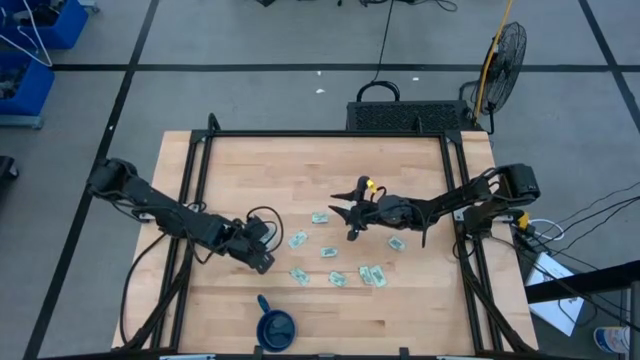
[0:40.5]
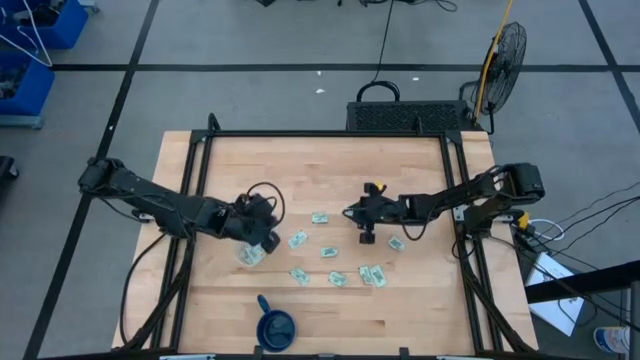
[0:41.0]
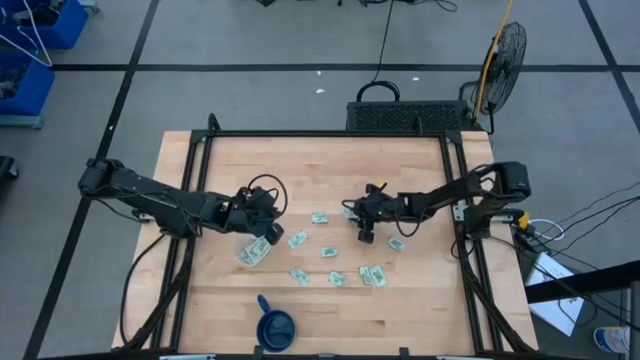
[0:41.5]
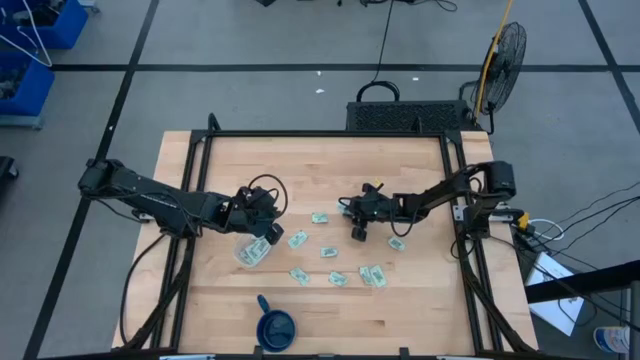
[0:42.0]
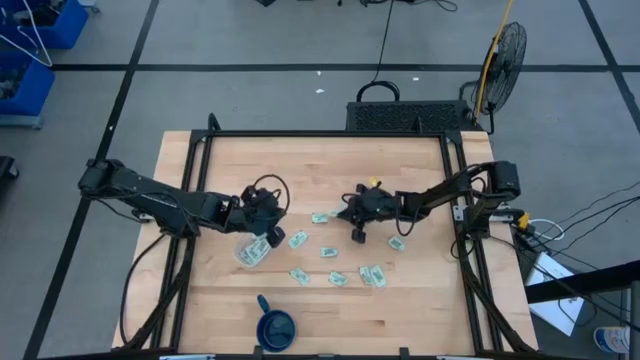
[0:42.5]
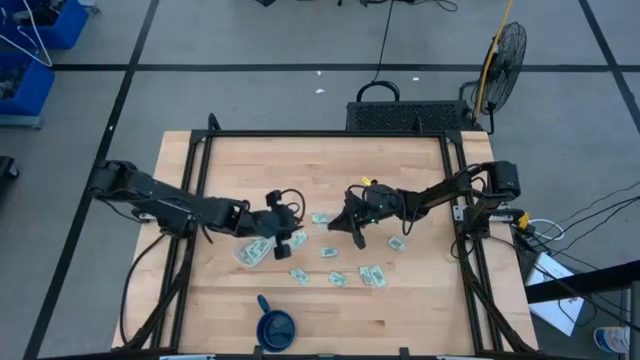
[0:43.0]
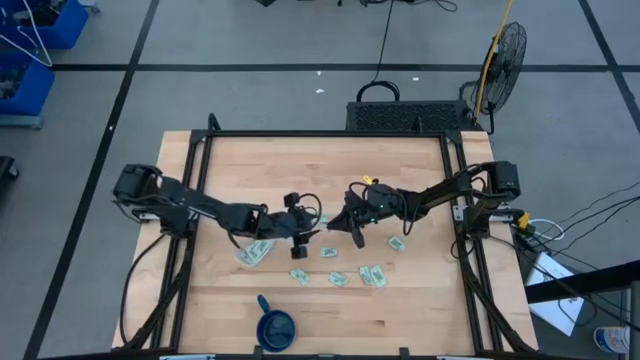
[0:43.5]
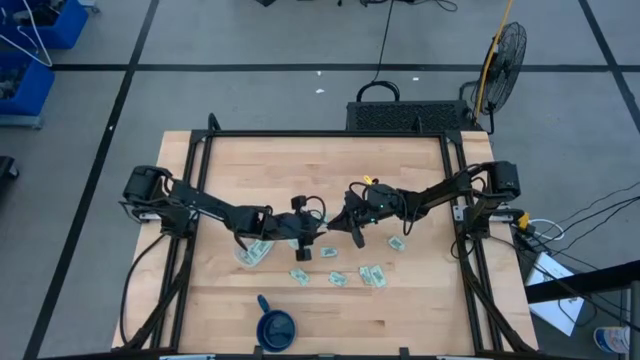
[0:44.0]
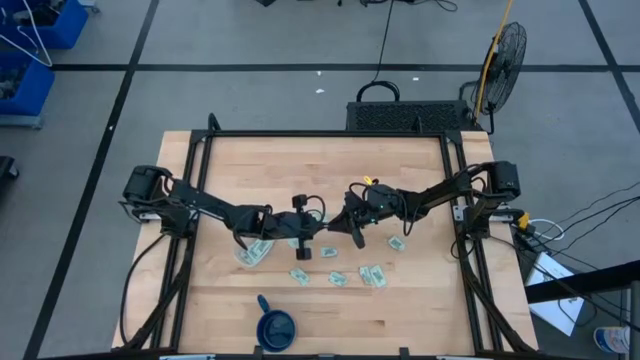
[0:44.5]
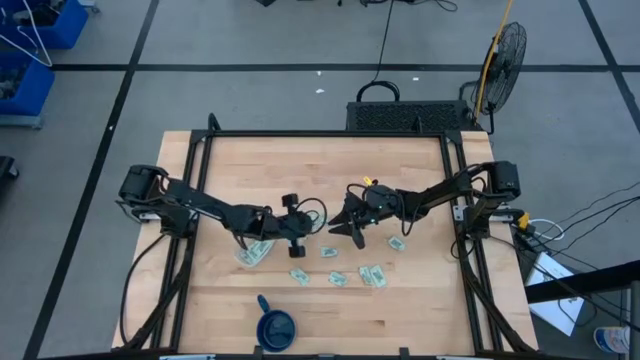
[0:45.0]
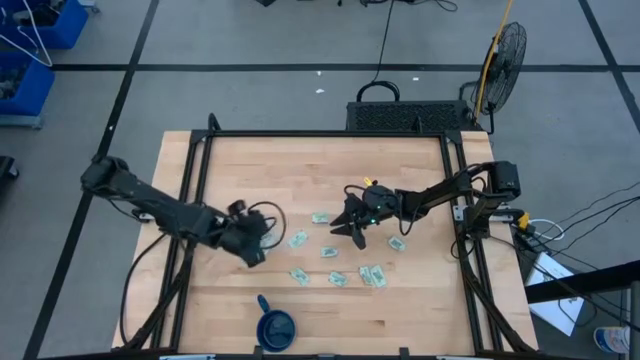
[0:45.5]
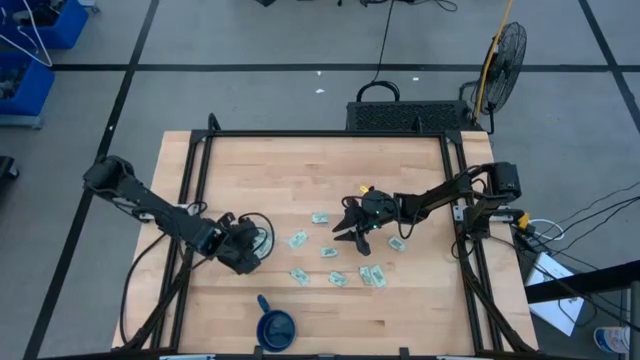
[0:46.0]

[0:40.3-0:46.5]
Task: Pick and place Stevia / Truvia into bins
Put the stevia packet into the transparent container

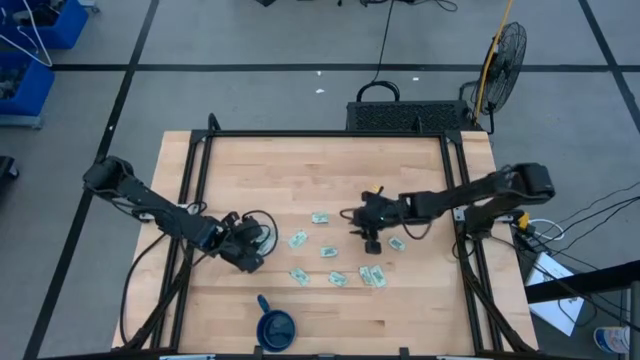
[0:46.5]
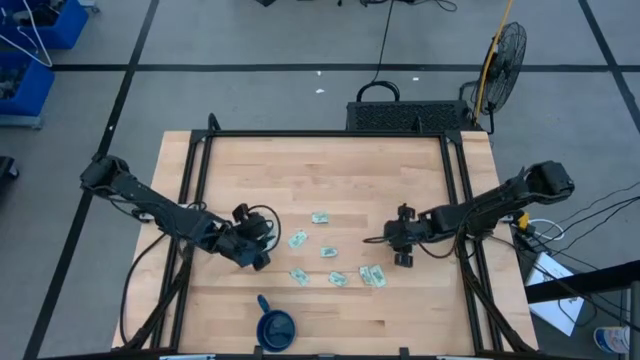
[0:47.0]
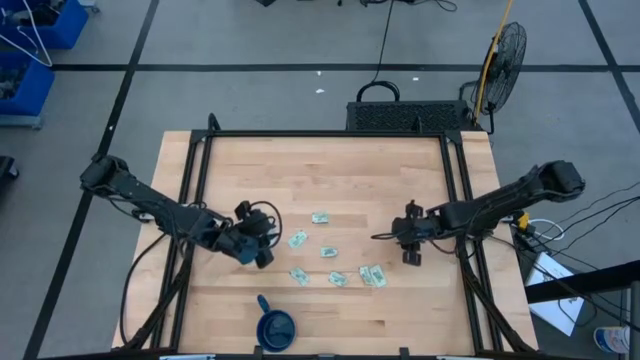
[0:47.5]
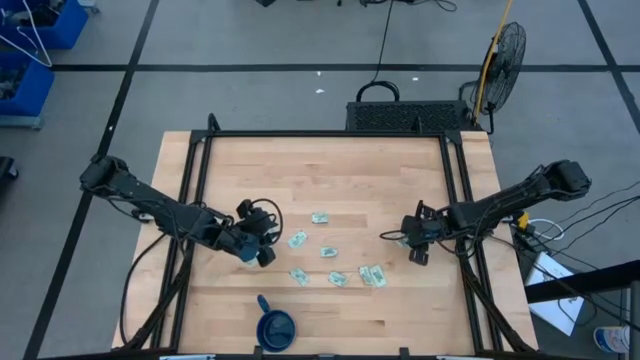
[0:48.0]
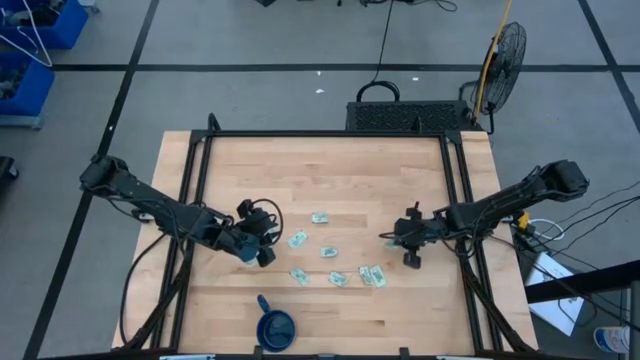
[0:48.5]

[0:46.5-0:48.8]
Put the stevia packet into the transparent container

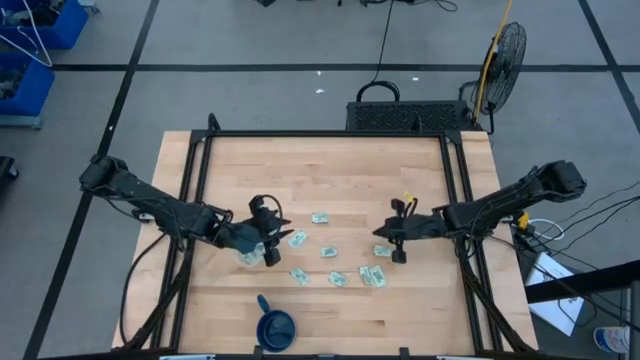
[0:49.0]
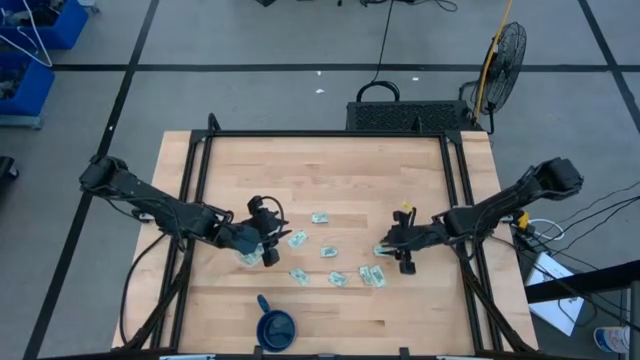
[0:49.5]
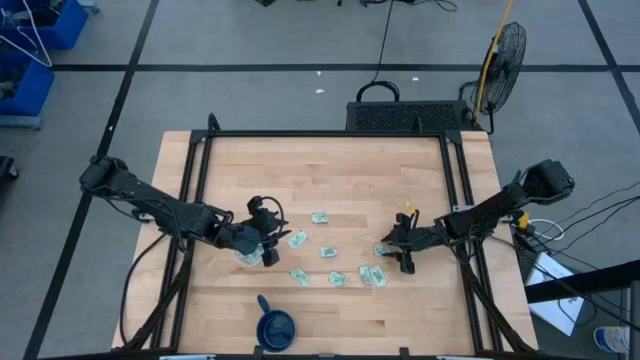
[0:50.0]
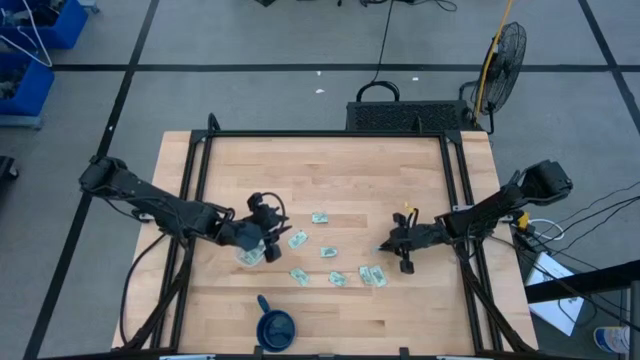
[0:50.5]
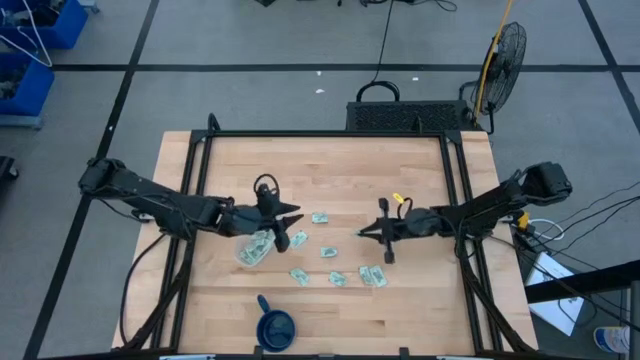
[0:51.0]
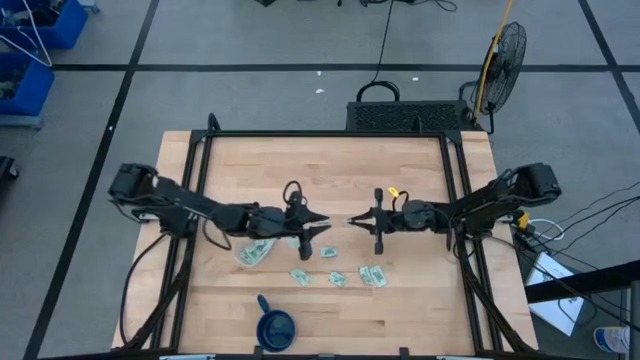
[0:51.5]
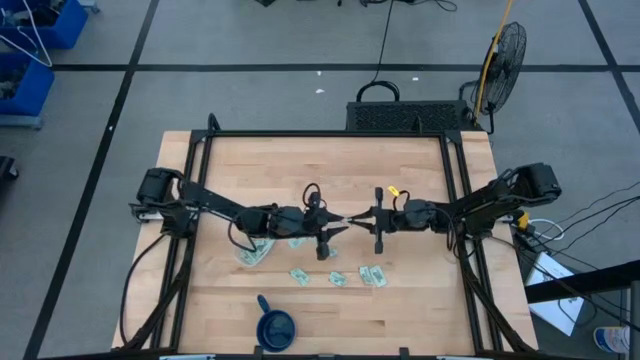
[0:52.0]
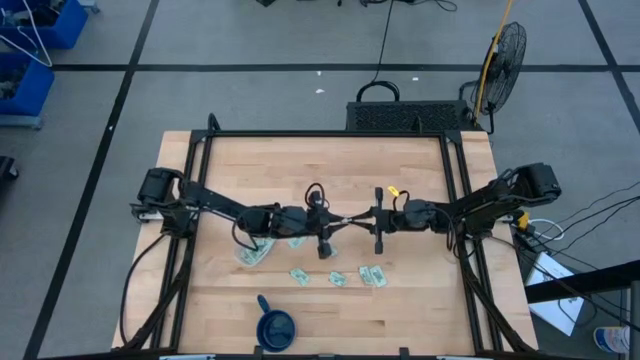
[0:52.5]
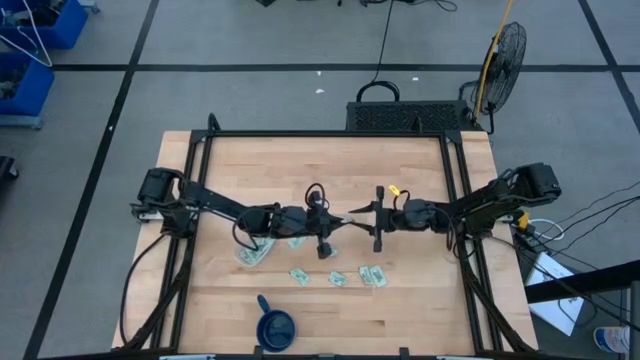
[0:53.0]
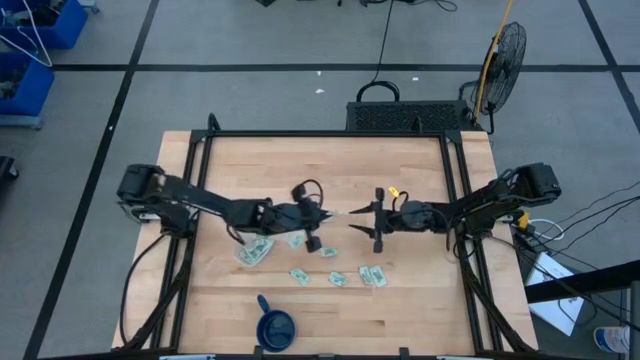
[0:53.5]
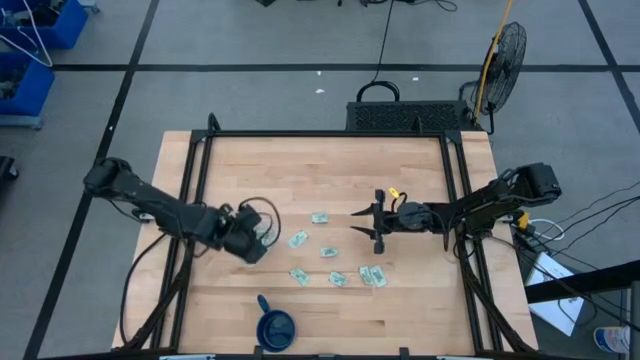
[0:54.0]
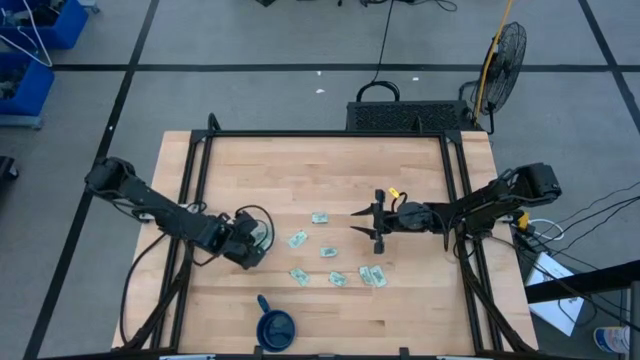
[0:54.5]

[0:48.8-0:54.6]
Put the stevia packet into the transparent container

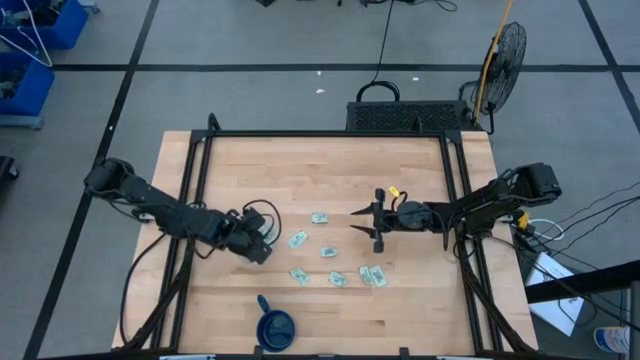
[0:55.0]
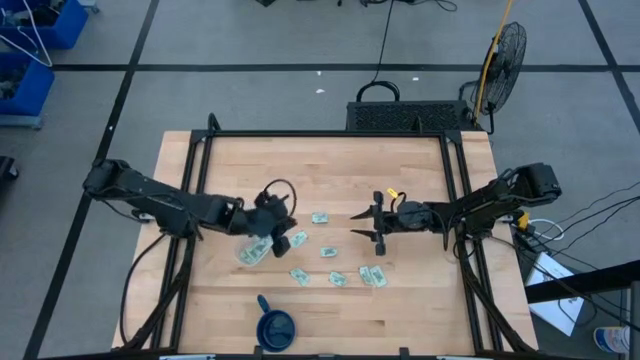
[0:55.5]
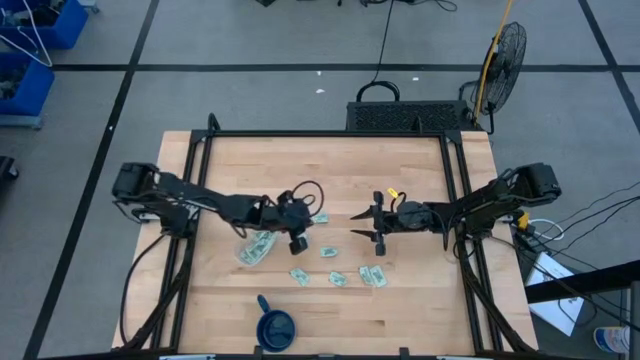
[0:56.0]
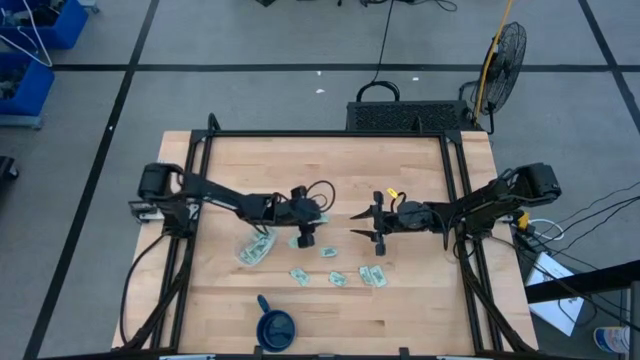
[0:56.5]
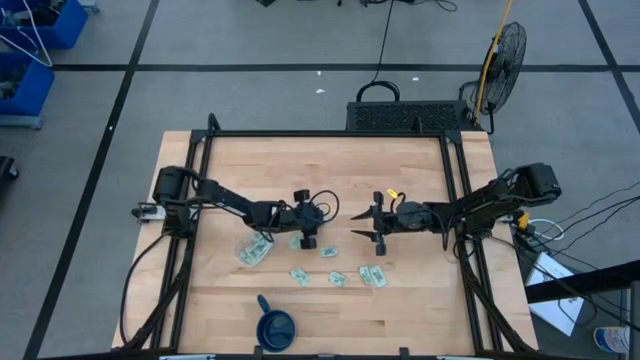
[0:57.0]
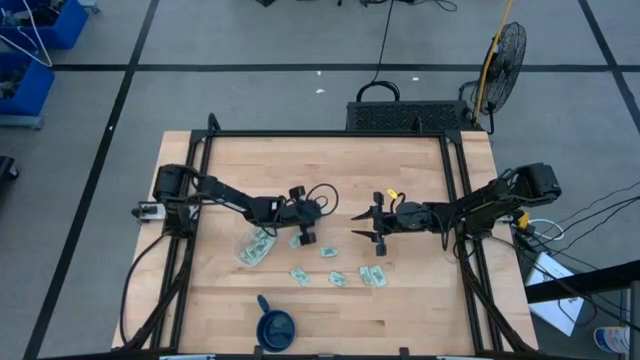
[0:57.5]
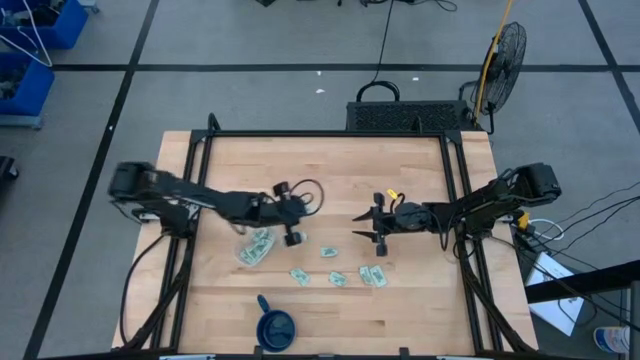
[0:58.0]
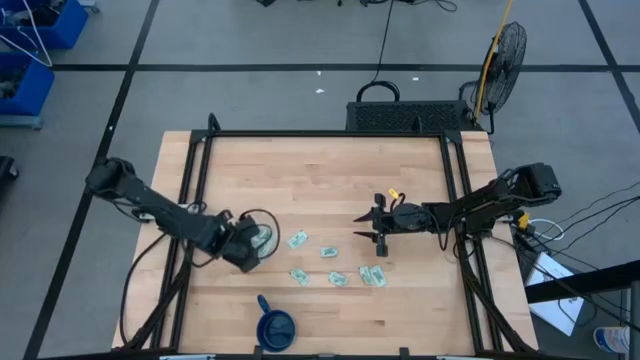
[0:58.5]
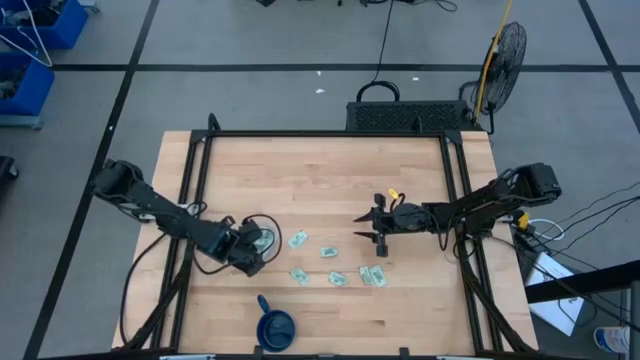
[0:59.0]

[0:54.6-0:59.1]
Put the stevia packet into the transparent container
